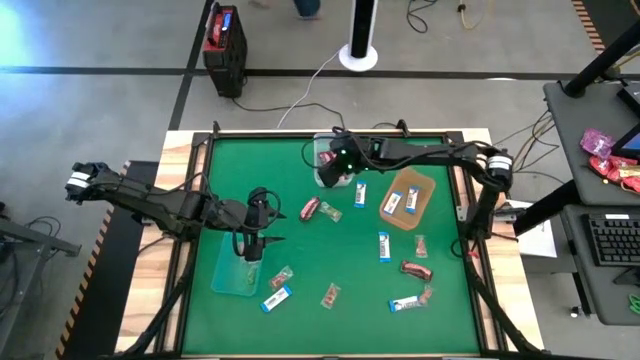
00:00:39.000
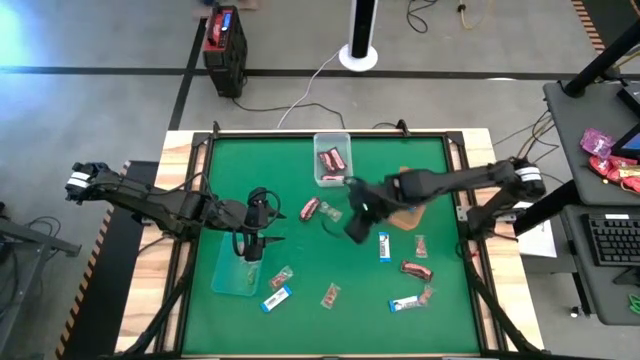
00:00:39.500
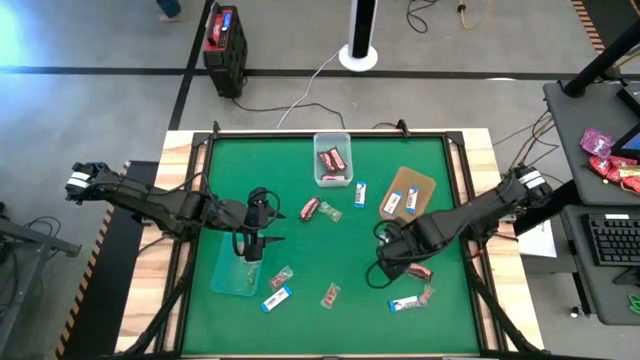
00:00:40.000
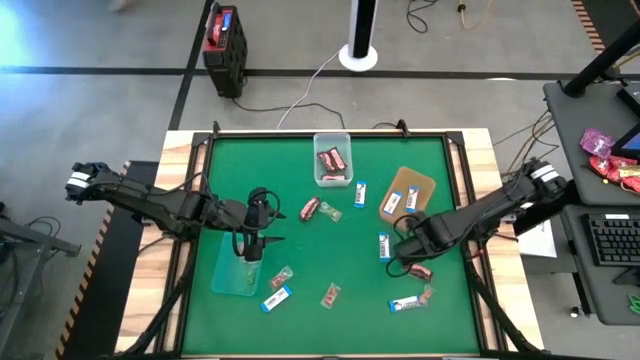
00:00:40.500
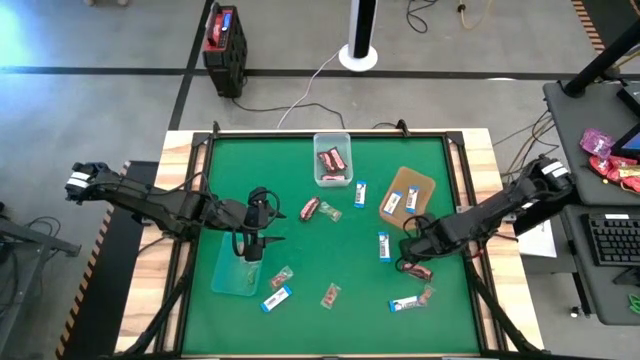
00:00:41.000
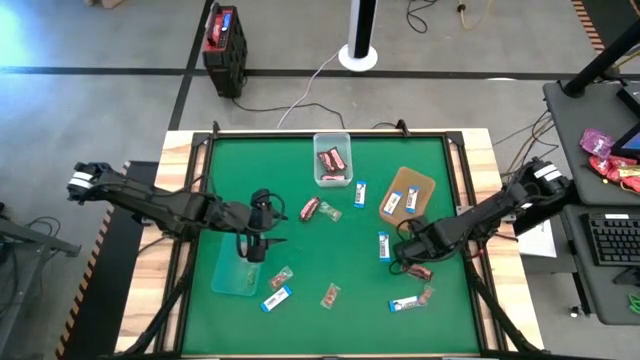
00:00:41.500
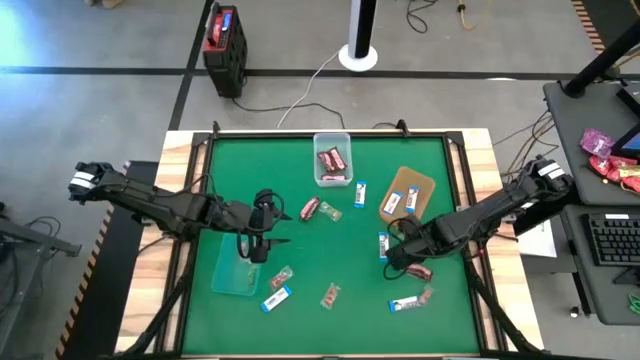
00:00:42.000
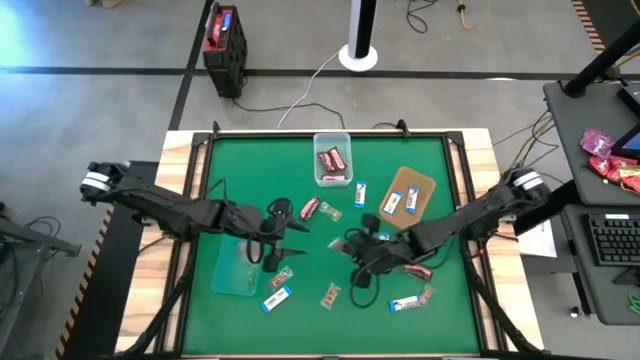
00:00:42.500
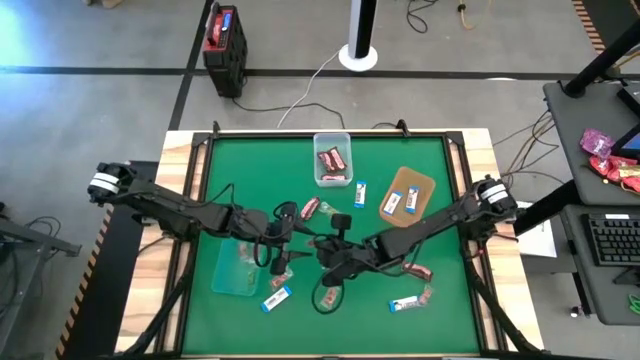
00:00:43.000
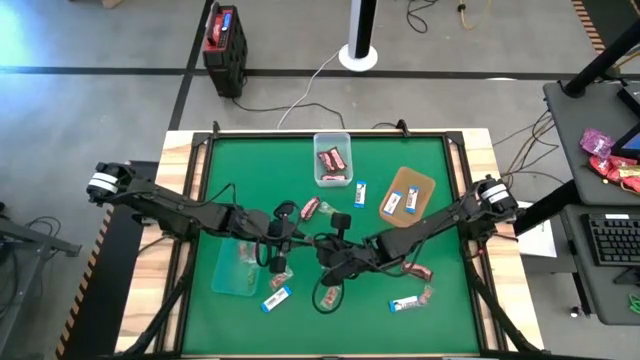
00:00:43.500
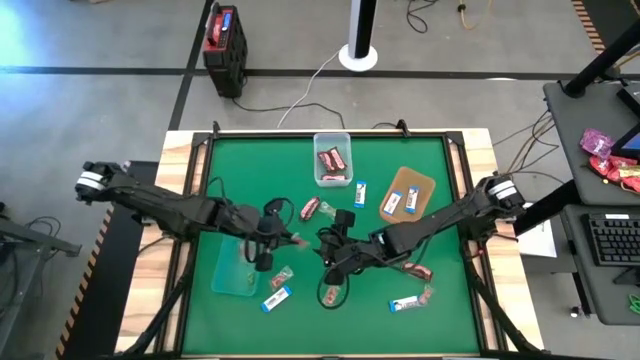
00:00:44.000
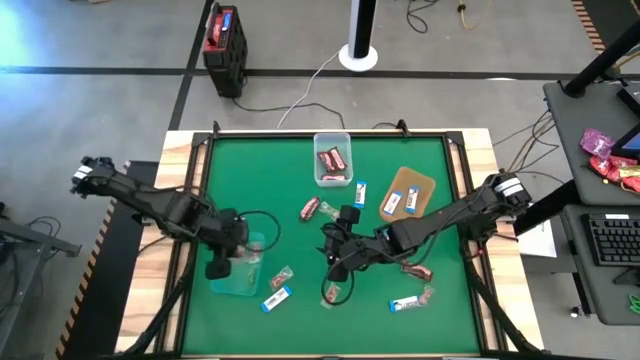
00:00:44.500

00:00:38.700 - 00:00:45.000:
Task: Sort candy by brand, put in halloween buckets
Put the orange gummy candy into the blue bin

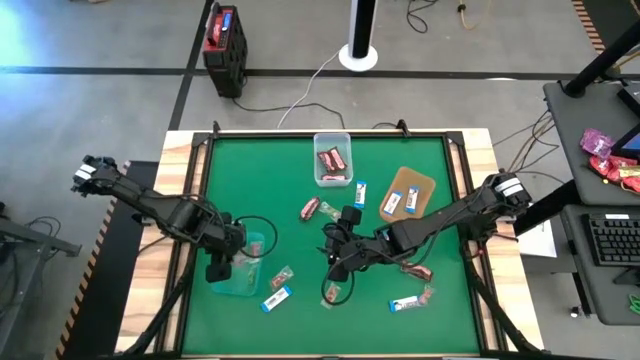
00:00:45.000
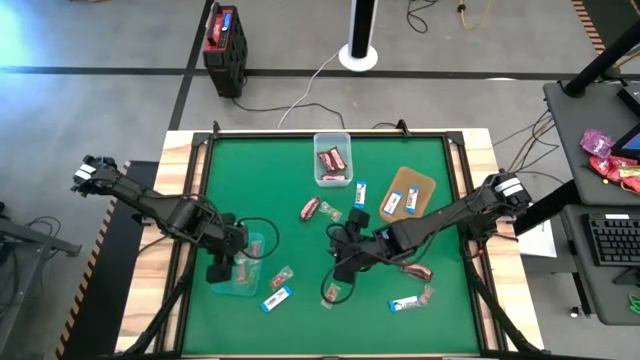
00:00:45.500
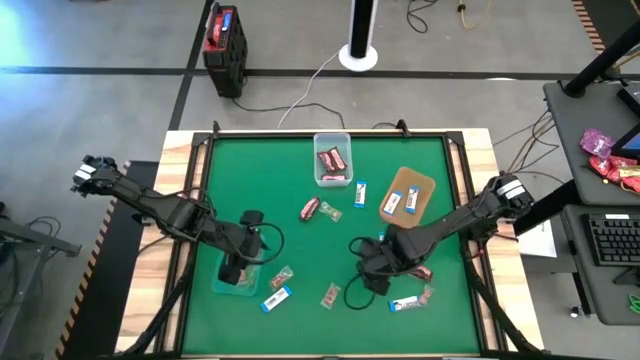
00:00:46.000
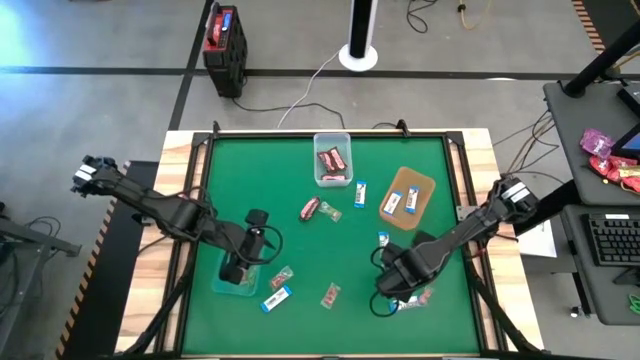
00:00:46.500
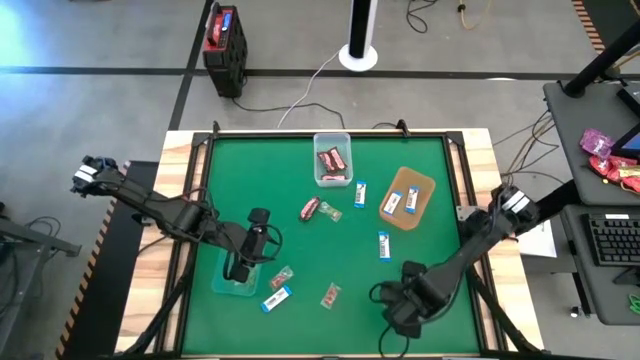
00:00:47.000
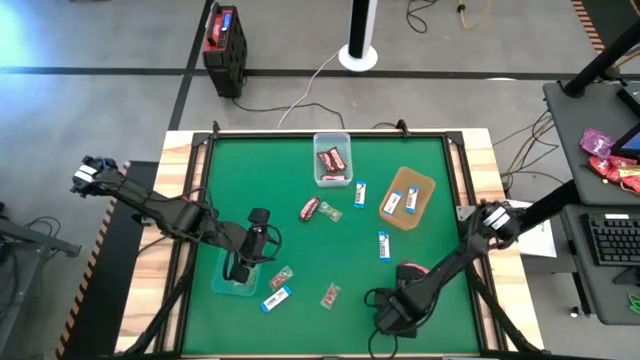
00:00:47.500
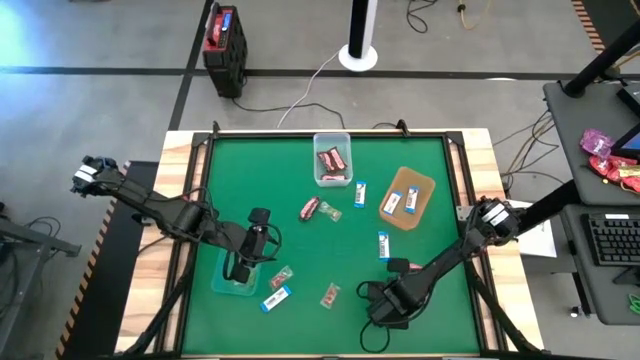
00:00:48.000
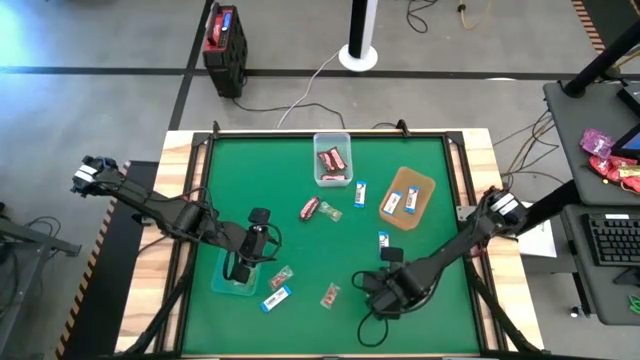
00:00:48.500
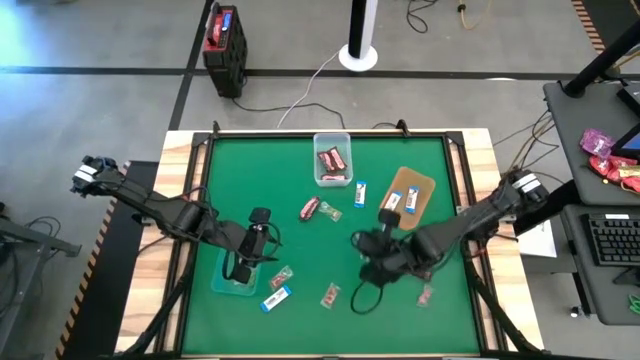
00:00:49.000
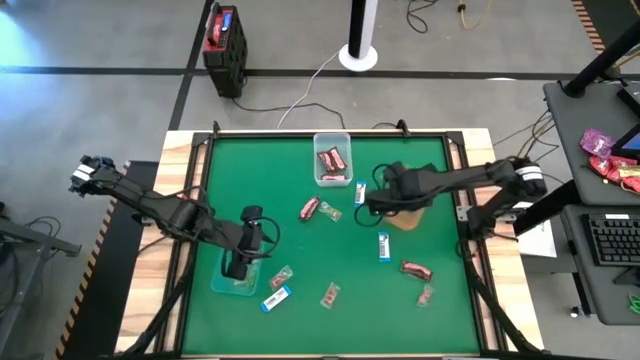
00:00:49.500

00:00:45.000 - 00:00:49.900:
Put the white chocolate into the orange bin

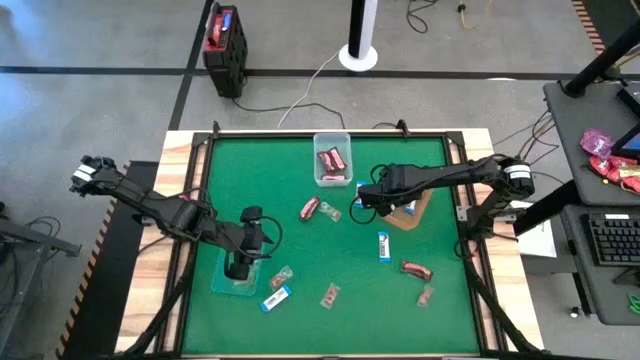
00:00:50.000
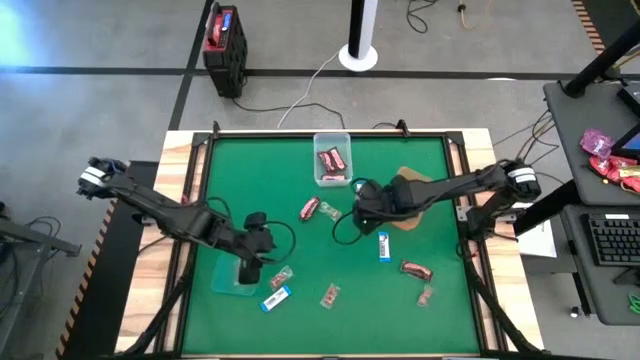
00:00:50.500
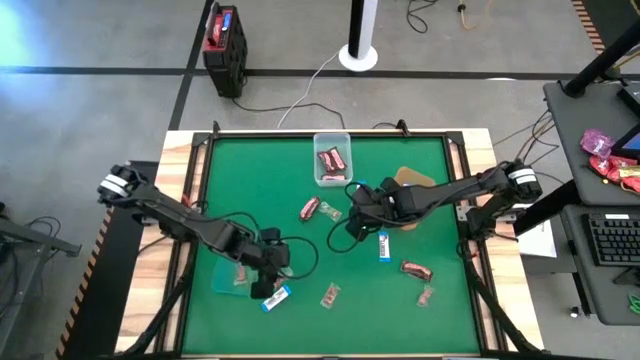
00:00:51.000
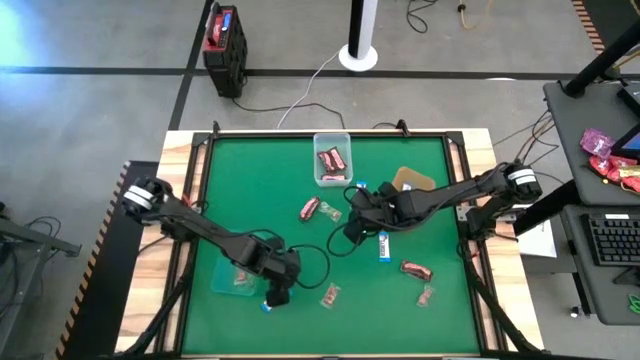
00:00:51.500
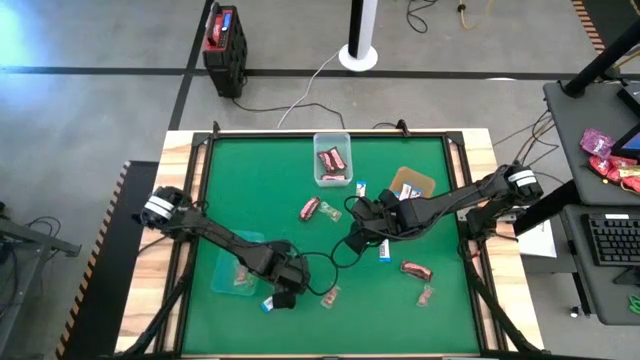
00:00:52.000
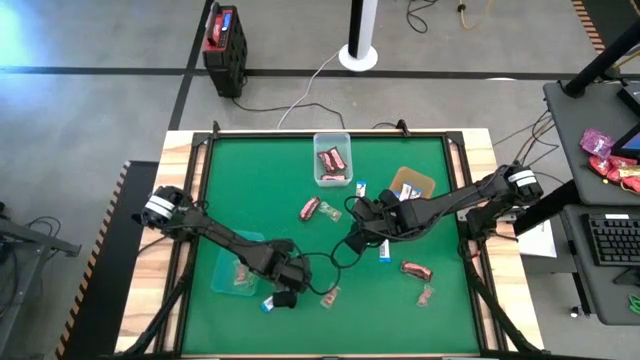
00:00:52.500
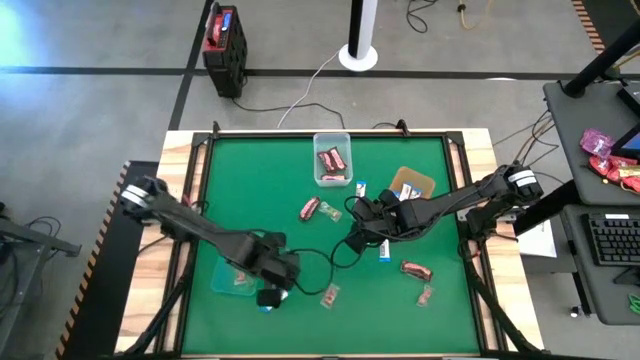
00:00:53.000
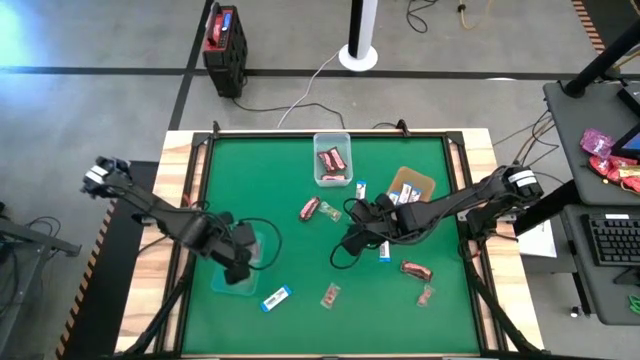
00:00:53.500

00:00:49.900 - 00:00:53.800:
Put the red gummy candy into the blue bin

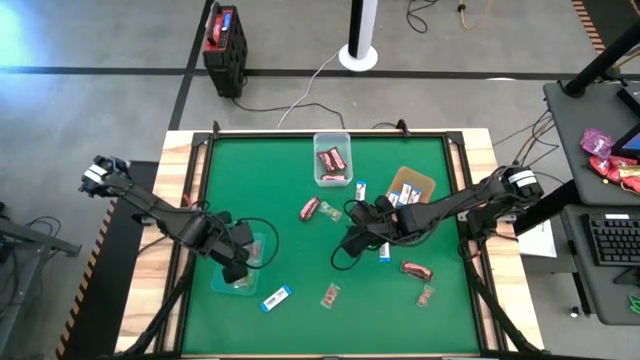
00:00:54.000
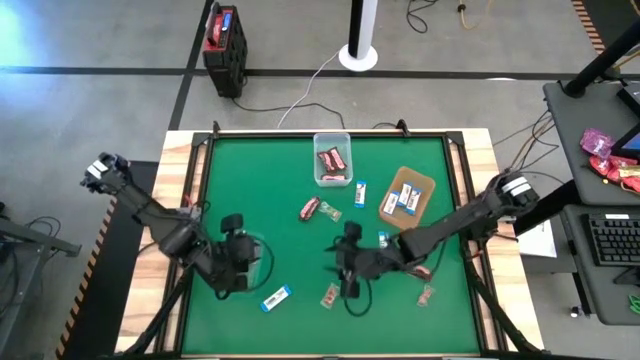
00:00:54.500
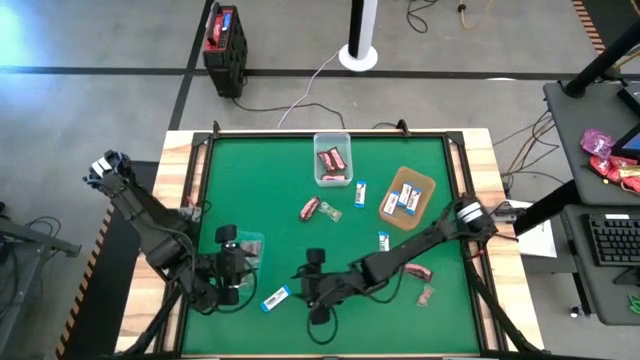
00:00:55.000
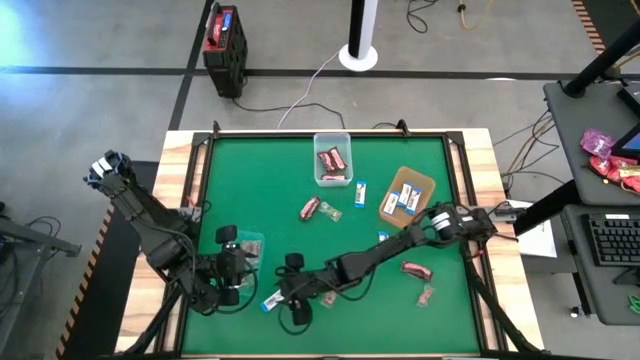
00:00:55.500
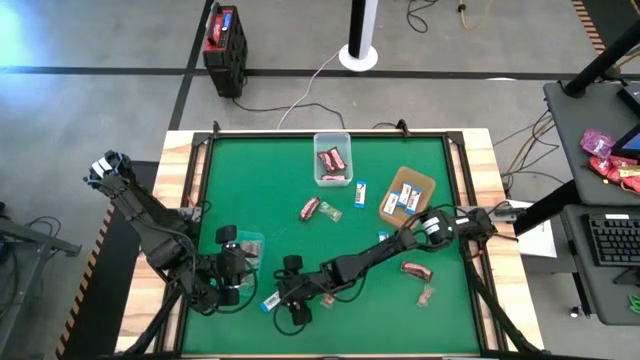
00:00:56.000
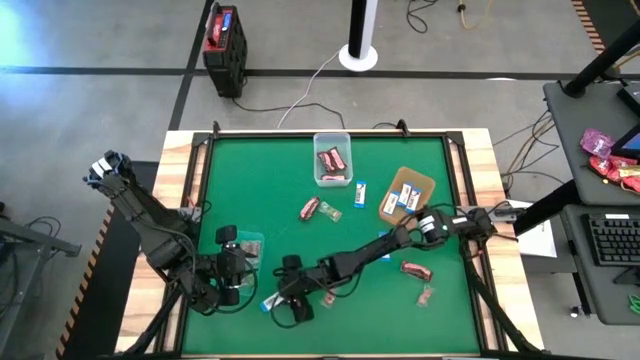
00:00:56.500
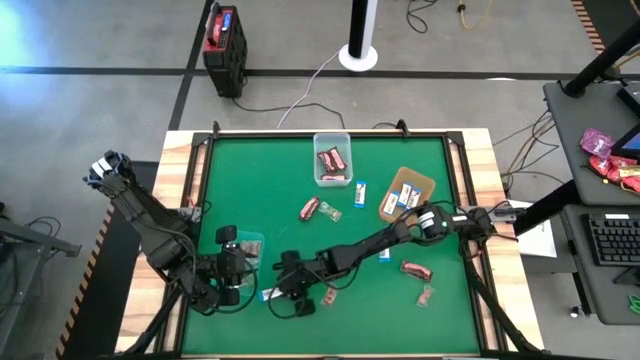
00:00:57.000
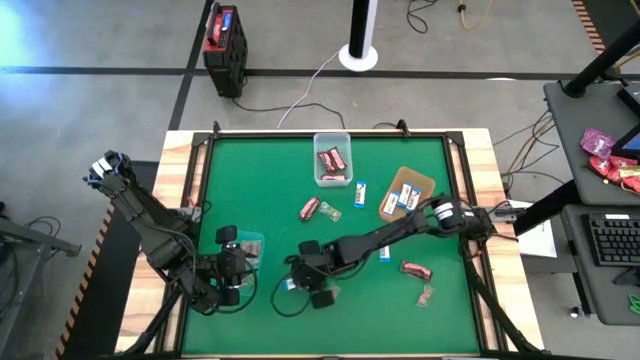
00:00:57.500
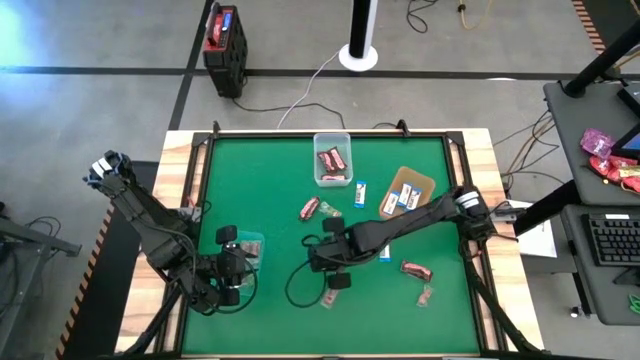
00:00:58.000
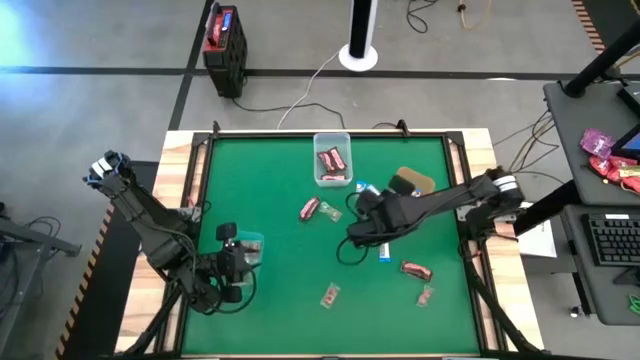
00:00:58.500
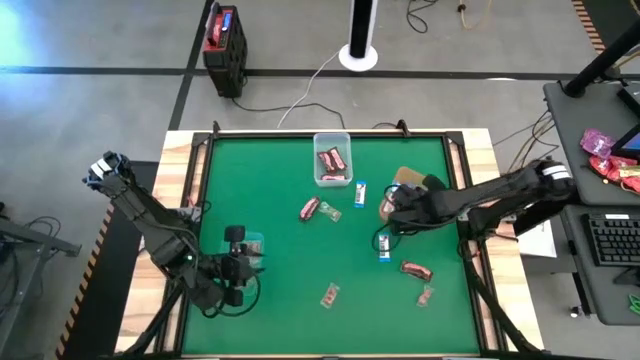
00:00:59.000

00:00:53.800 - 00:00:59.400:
Put the white chocolate into the orange bin

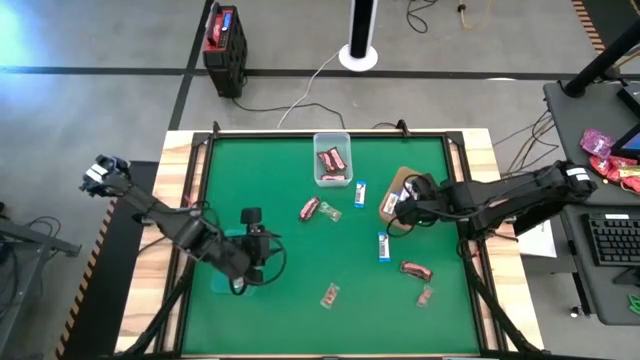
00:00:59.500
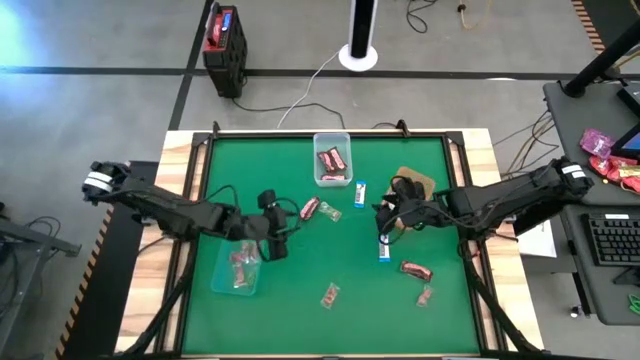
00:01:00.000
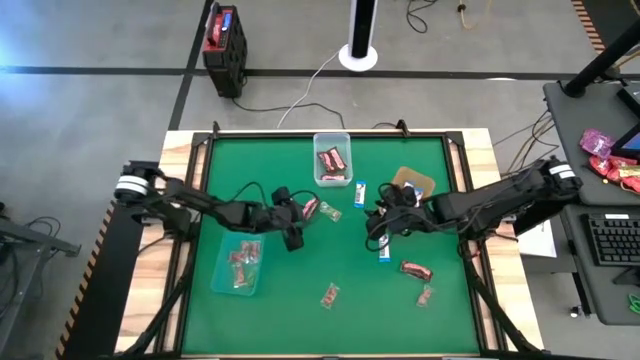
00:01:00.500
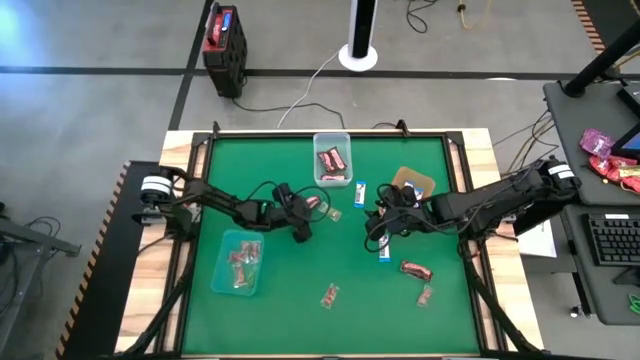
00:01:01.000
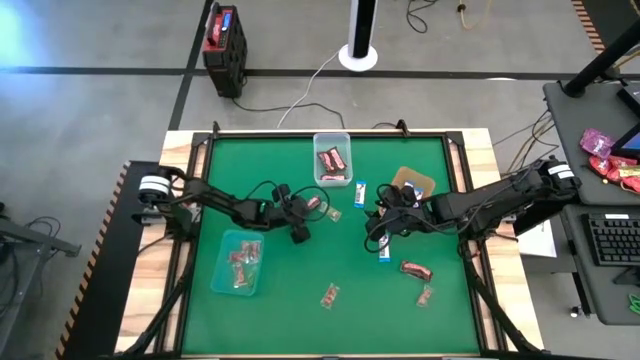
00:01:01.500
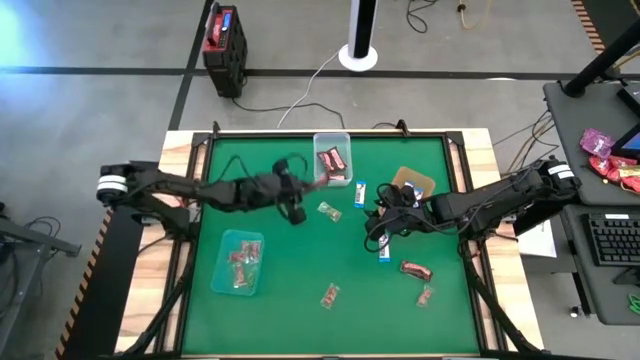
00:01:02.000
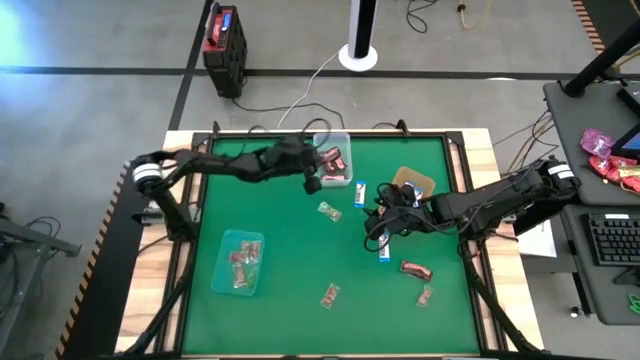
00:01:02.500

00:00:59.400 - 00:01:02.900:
Put the brown chocolate into the top transparent bin
